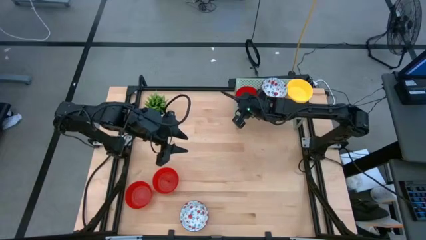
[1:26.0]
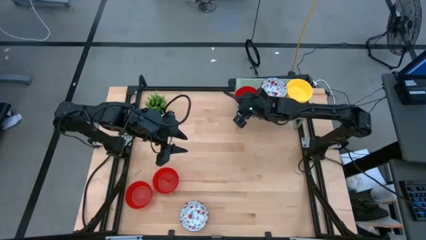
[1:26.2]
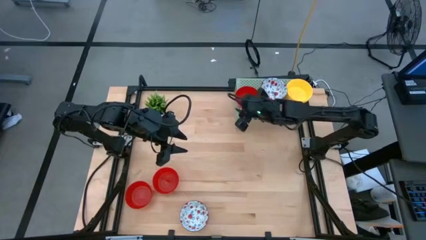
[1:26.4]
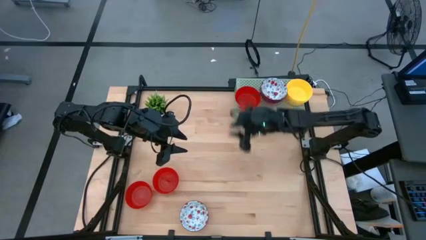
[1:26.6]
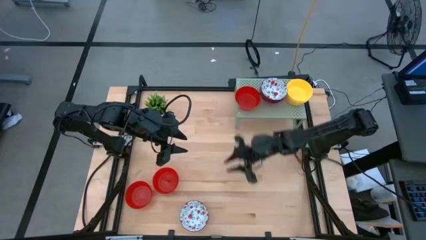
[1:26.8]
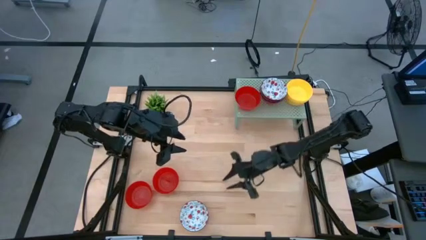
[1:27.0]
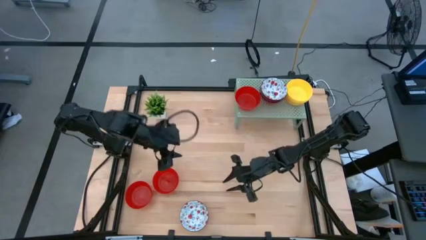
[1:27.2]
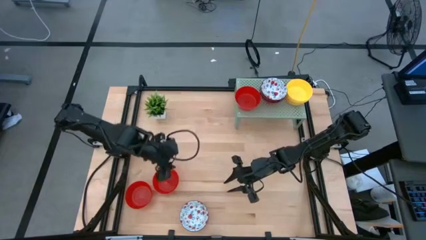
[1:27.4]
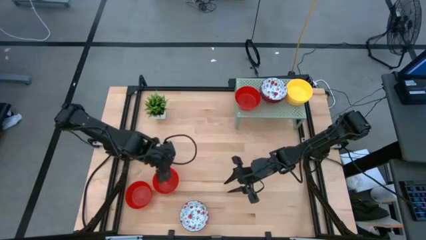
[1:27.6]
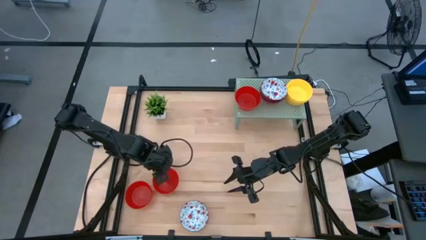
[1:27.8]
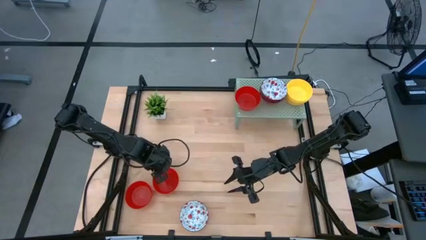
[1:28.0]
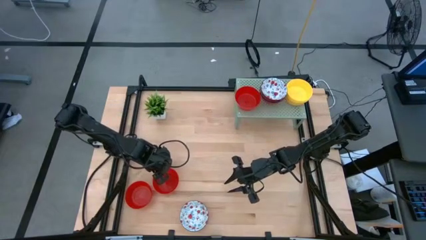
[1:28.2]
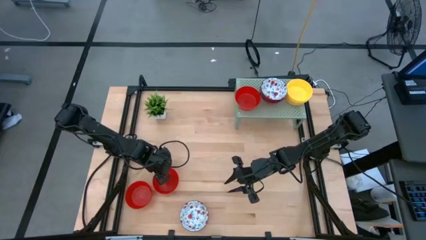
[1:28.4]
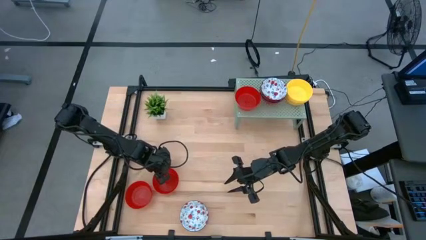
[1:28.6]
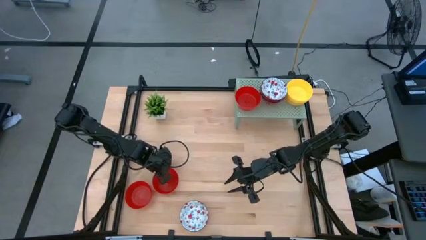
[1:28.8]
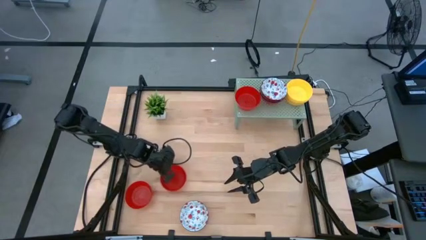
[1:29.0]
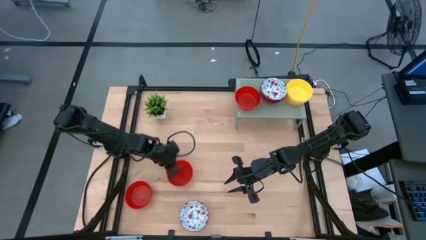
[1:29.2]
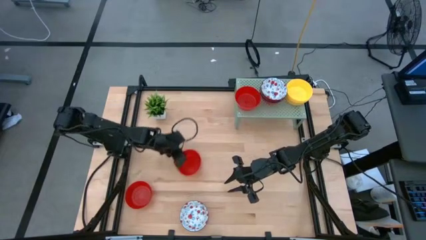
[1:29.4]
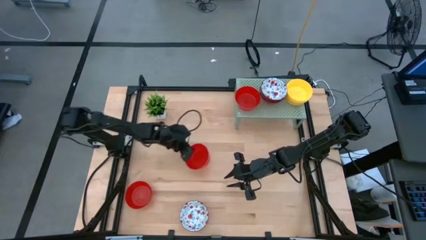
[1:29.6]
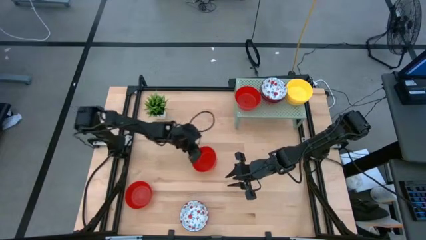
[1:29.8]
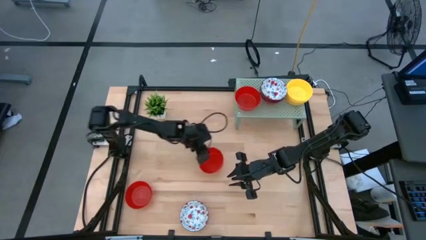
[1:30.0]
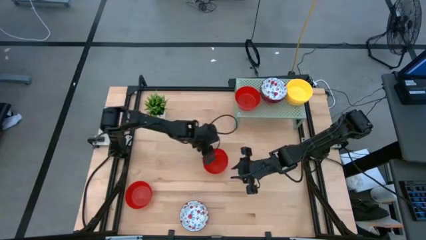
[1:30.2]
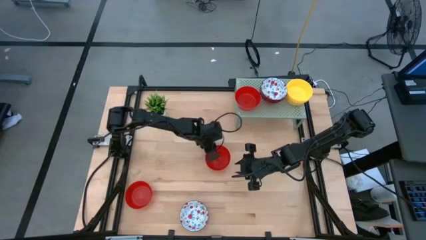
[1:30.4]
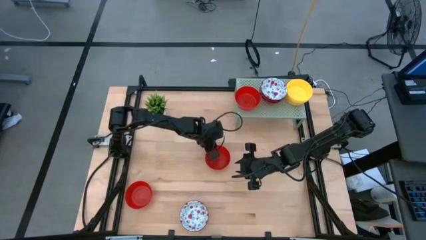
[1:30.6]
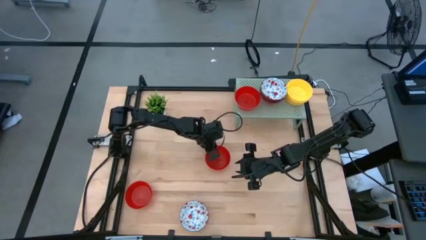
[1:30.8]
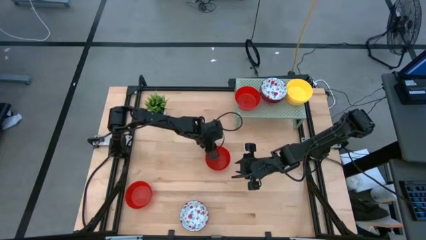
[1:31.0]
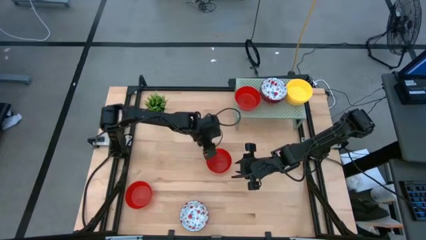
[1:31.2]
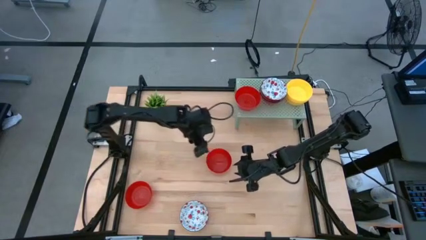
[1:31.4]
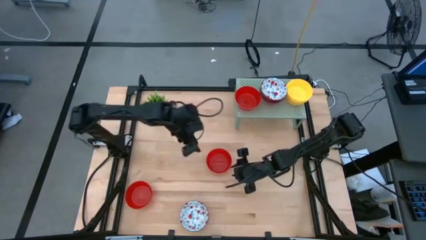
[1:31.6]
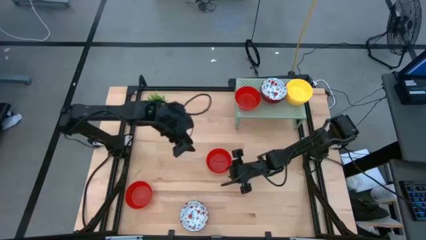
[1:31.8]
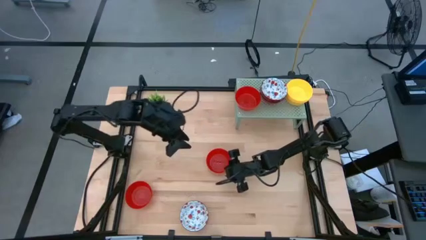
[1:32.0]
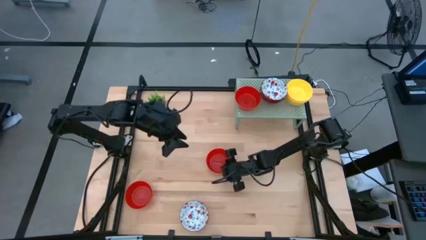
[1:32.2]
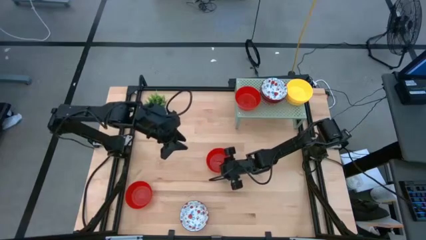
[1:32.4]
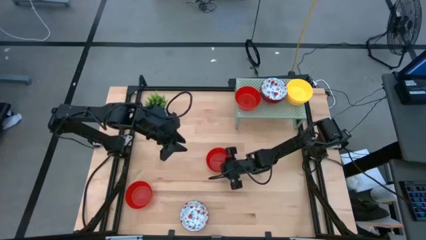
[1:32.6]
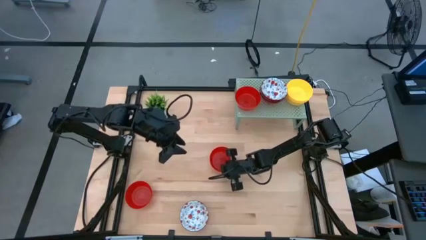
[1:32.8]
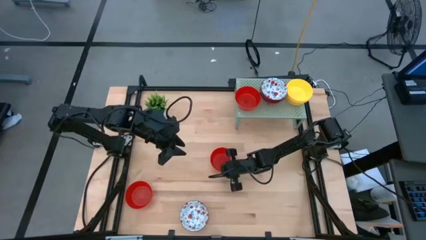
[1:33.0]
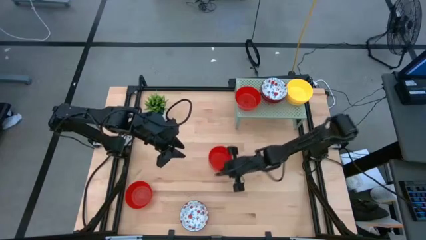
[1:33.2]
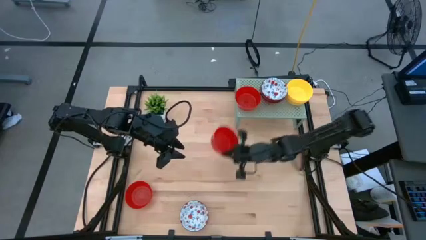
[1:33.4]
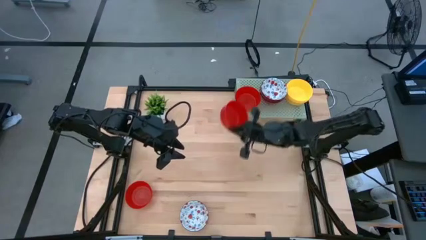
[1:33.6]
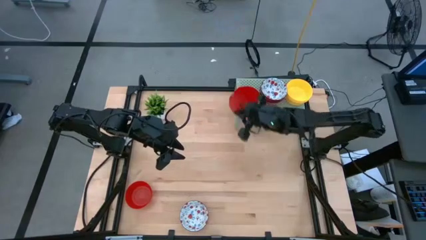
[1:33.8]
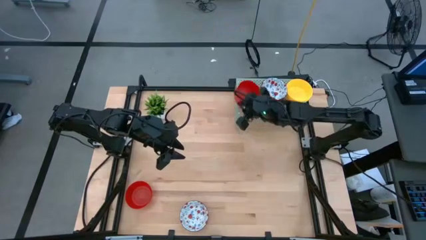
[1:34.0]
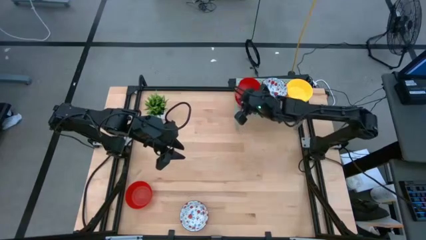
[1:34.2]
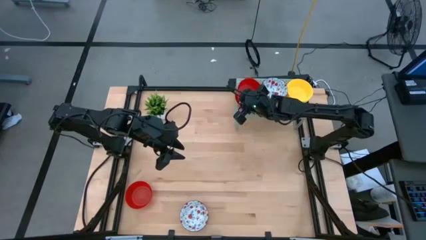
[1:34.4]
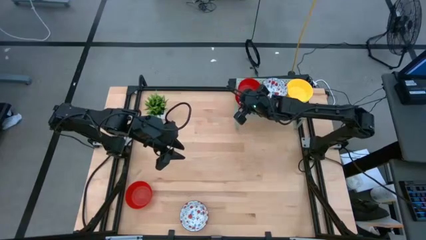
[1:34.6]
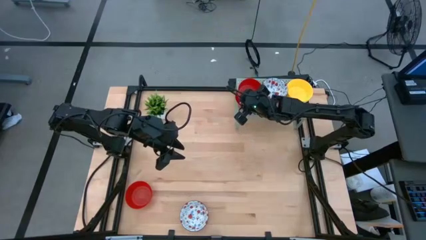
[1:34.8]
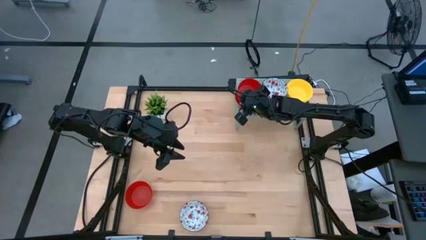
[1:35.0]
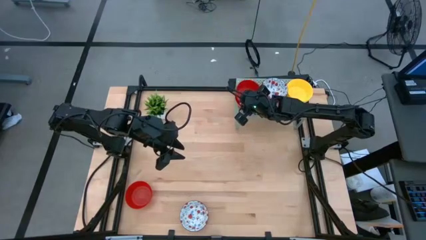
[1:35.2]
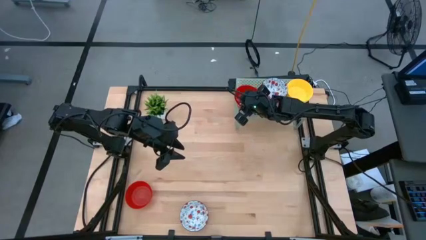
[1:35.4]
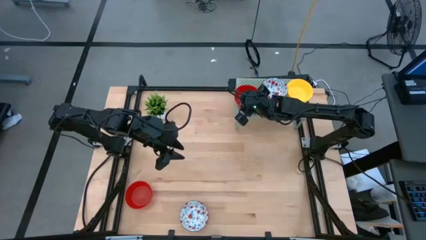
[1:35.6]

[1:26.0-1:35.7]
Task: Pick & Place Mini bowls
Stack the red bowl on the red bowl on the shelf

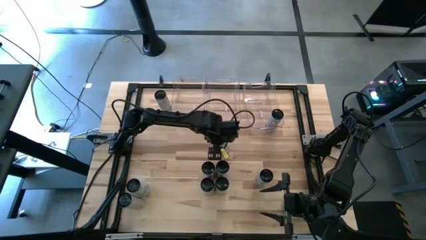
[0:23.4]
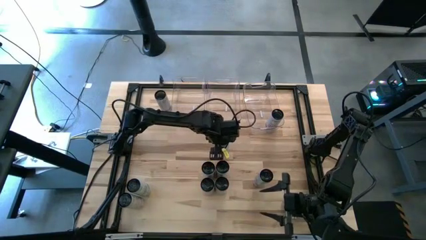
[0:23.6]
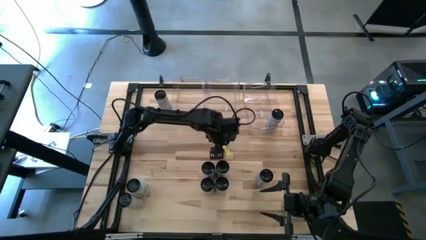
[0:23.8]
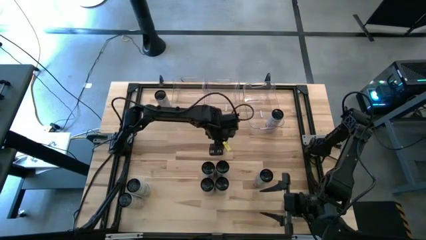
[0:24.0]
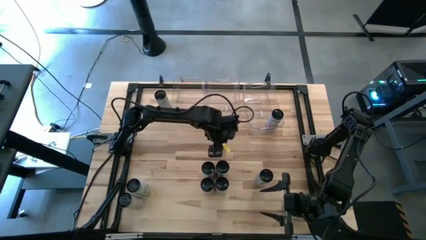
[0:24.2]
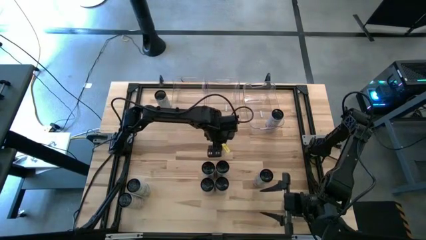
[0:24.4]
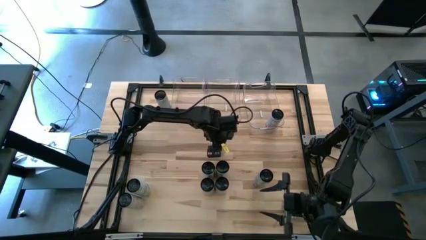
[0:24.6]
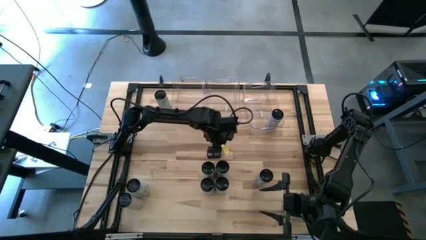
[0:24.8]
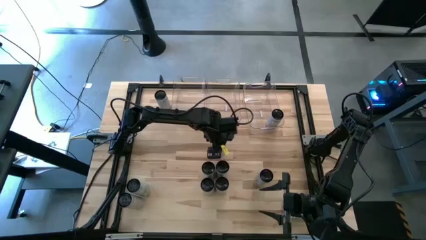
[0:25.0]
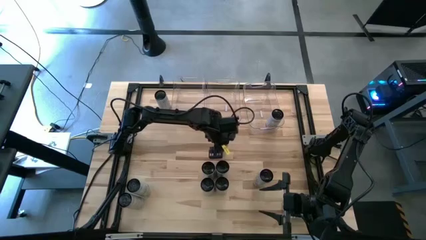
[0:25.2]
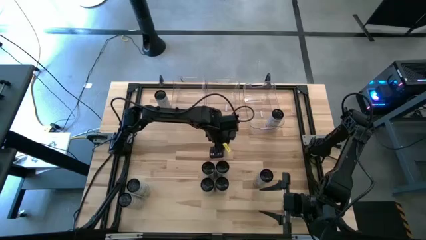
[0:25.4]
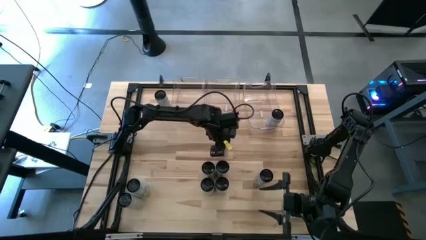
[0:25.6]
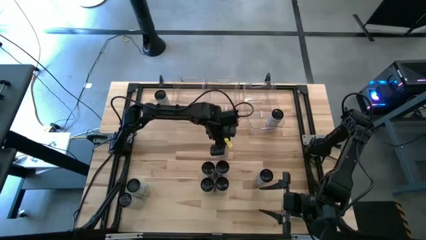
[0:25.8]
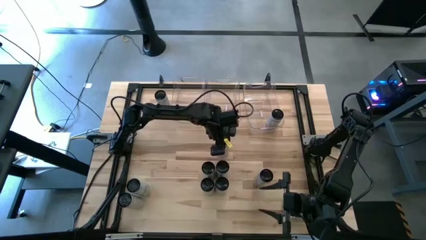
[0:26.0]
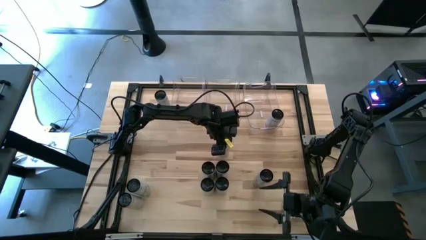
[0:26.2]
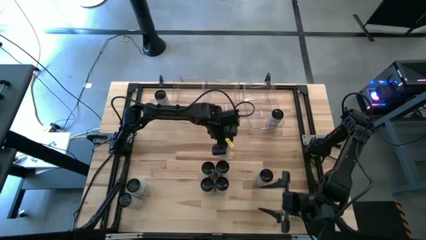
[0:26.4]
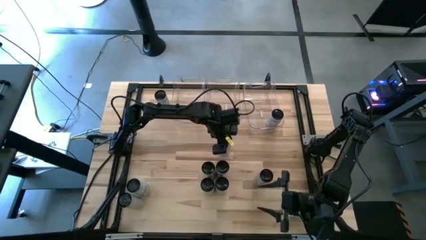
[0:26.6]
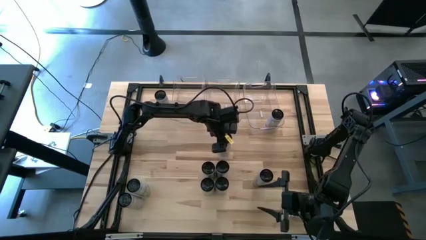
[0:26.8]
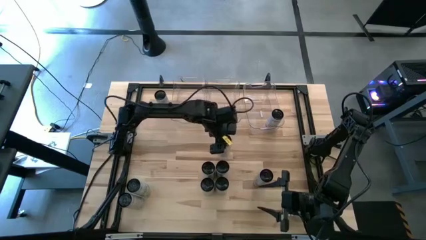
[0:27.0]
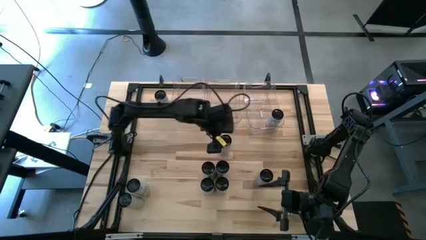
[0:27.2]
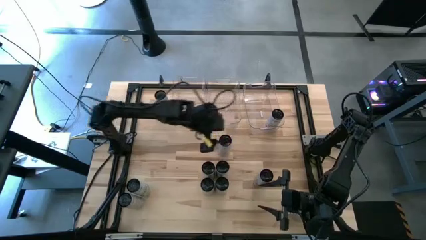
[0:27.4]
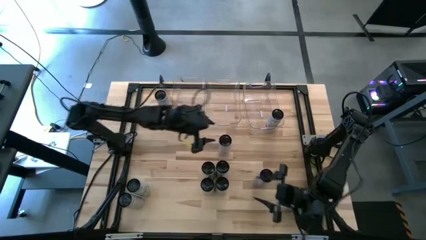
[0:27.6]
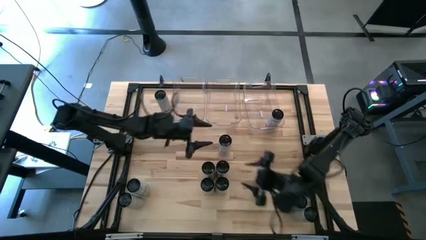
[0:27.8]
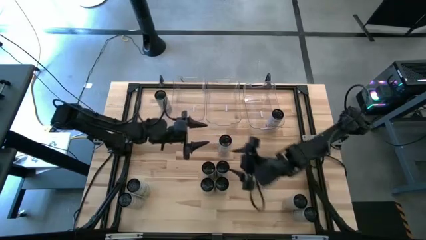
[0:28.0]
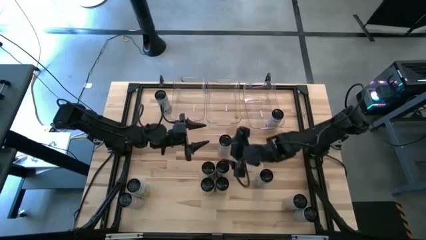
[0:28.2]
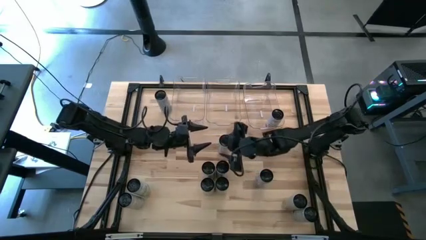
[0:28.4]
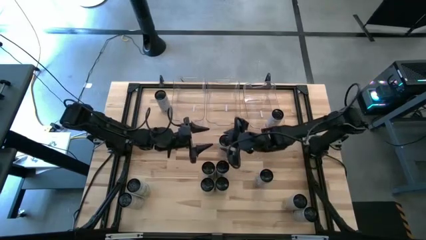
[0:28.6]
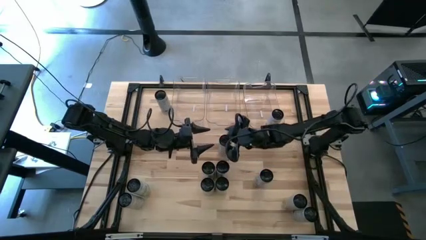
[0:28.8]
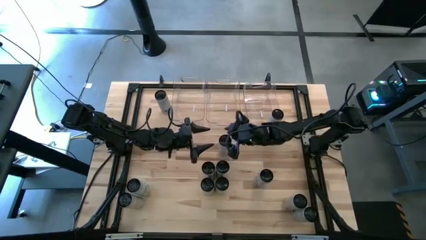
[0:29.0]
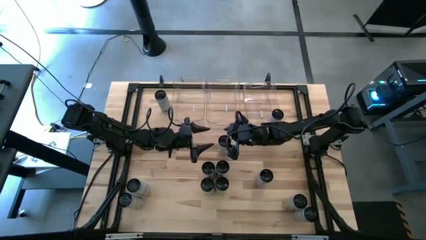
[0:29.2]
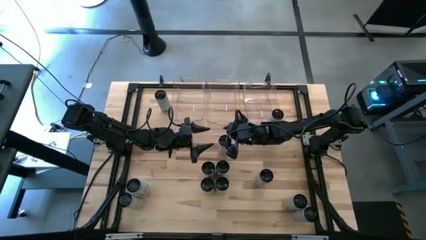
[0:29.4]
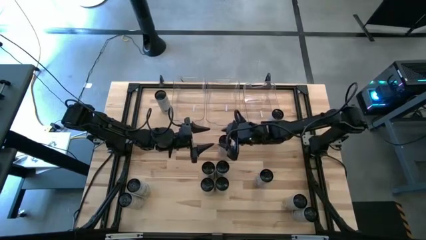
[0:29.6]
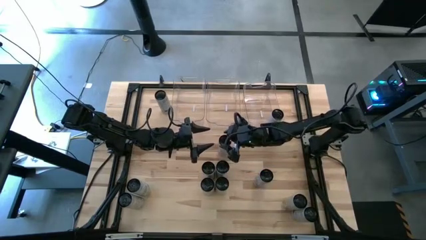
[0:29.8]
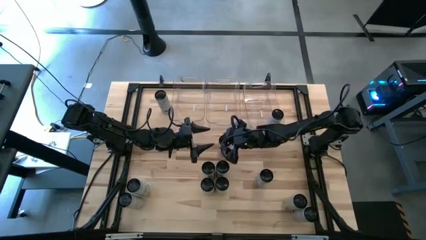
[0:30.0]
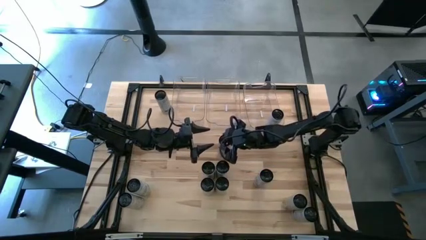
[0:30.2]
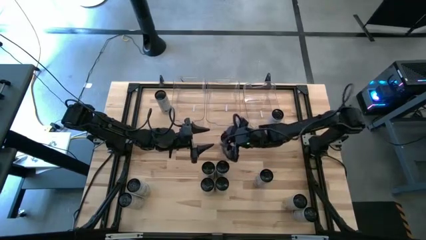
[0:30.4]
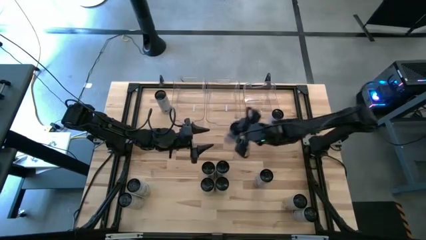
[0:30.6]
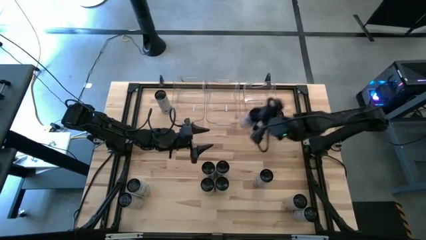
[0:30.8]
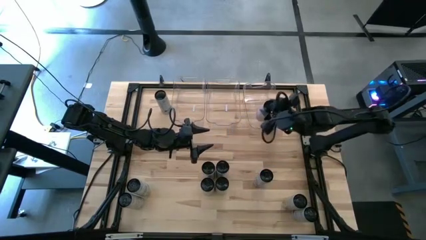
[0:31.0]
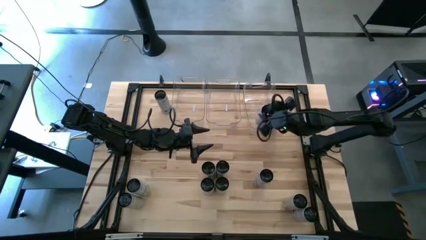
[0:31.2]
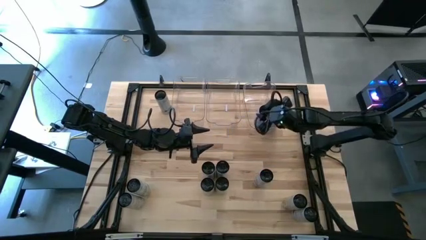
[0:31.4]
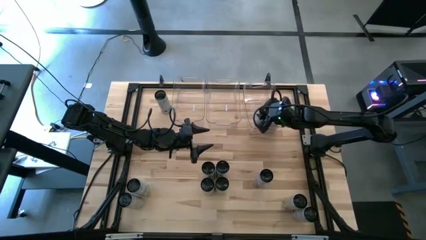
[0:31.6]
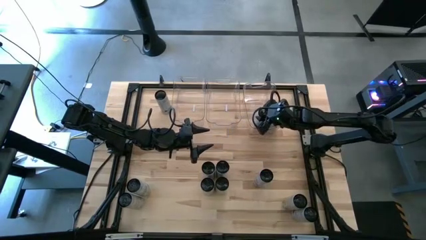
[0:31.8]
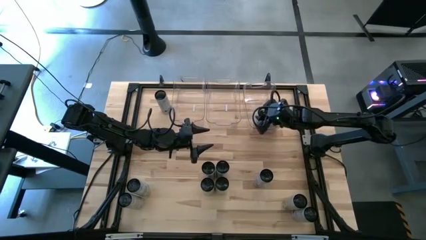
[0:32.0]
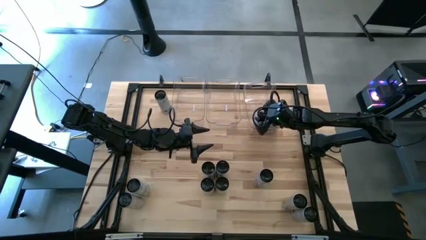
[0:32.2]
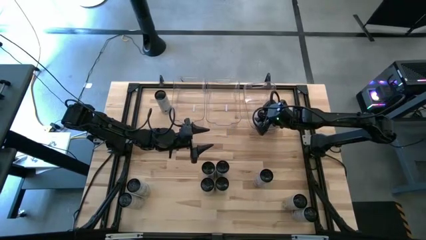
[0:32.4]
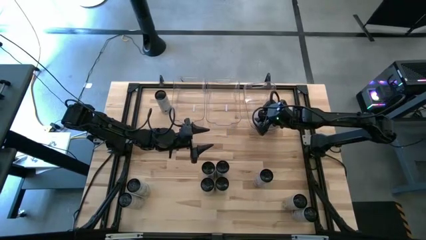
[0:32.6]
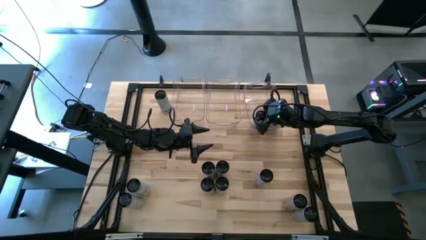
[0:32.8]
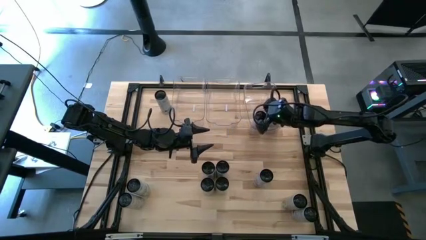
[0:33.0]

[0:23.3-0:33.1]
Task: Sort soda cans
Put the top white-pink soda can into the right transparent bin
